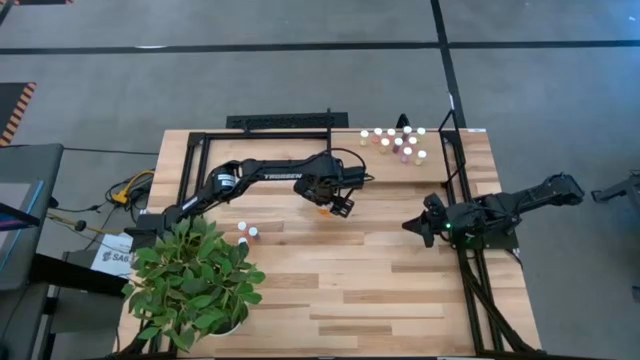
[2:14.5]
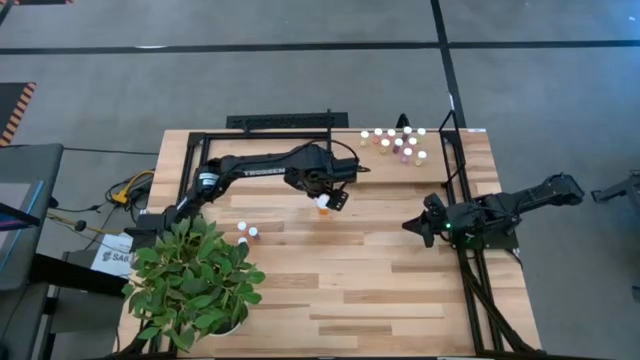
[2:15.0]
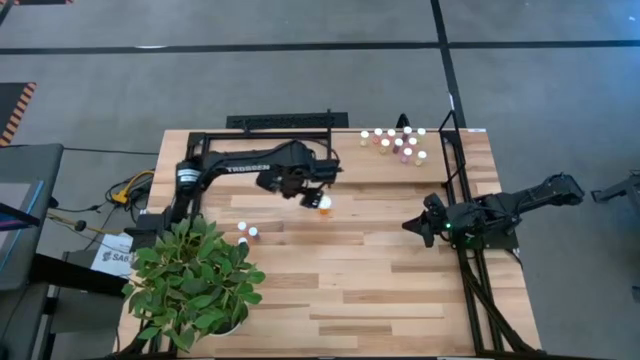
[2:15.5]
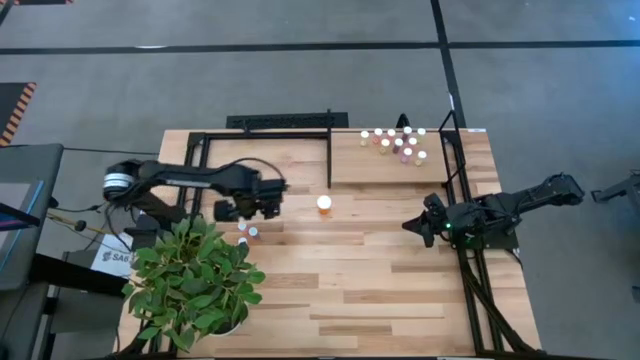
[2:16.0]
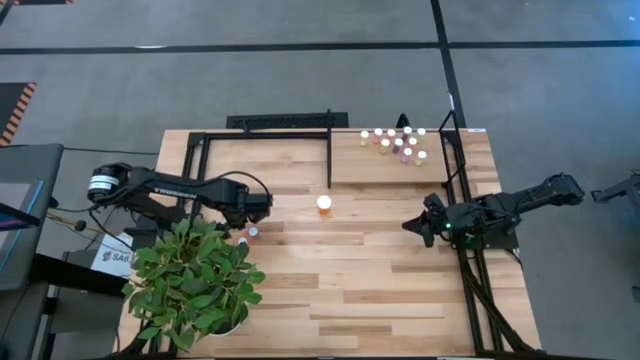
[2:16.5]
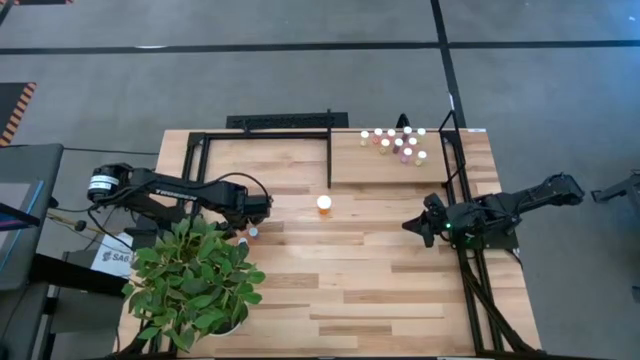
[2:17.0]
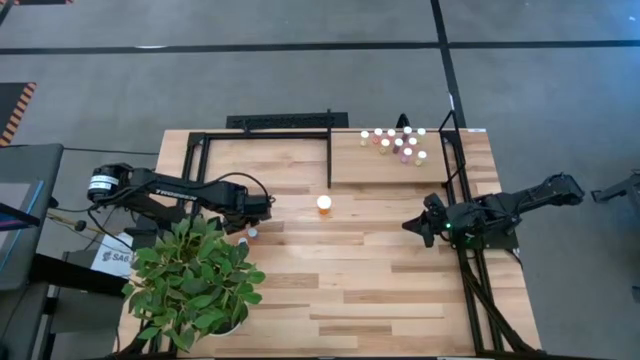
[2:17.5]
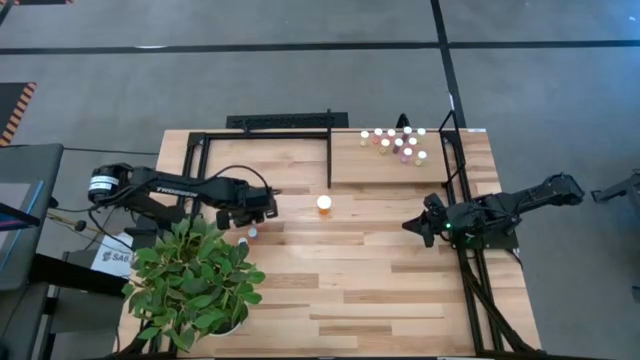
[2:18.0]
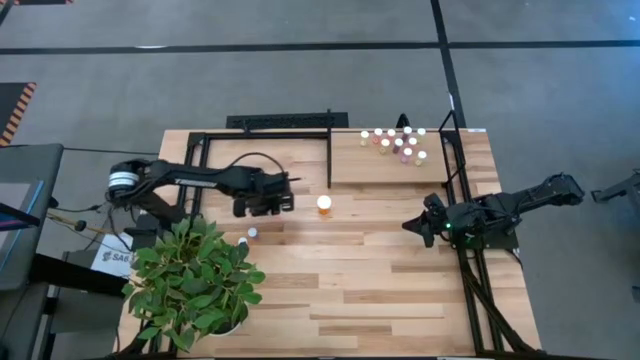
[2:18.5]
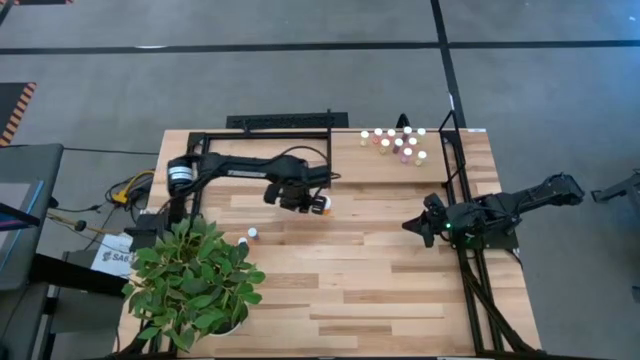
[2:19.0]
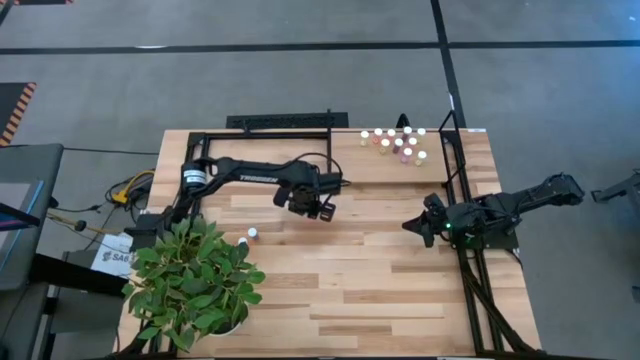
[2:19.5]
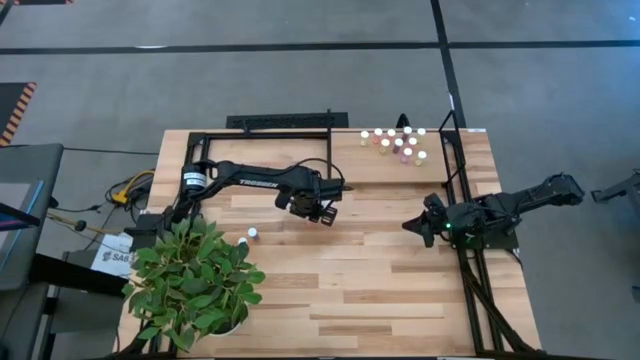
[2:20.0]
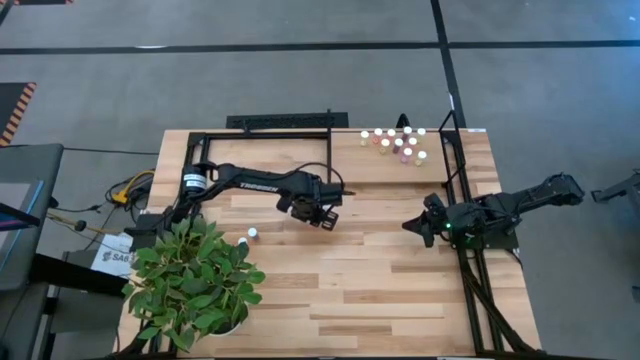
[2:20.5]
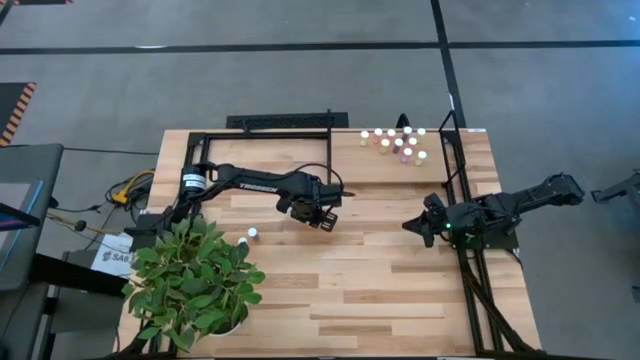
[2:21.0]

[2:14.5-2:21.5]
Task: Pick and place medicine bottles onto shelf by color
Move the pink pill bottle to the center of the table

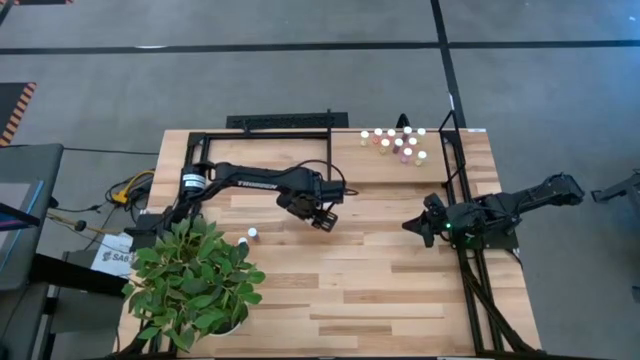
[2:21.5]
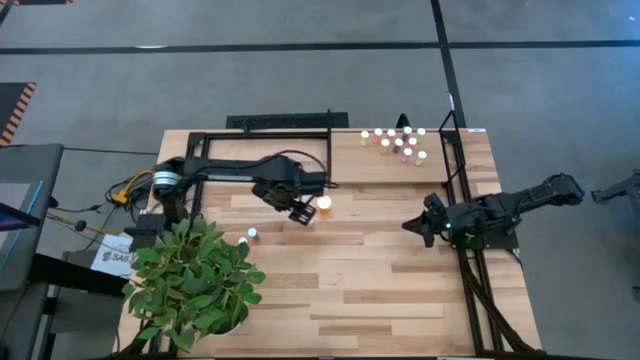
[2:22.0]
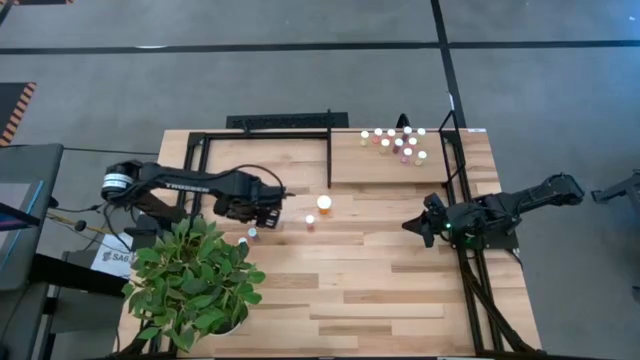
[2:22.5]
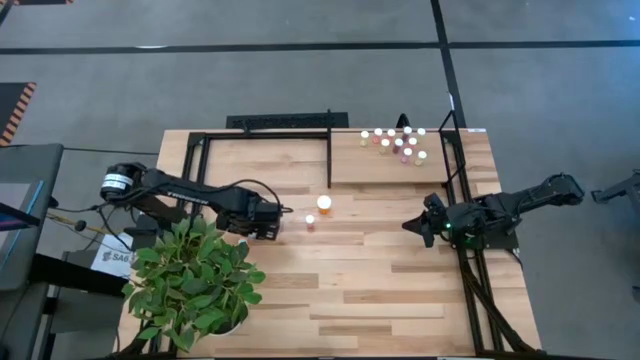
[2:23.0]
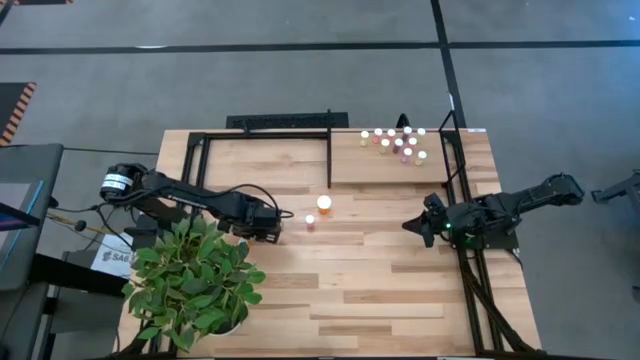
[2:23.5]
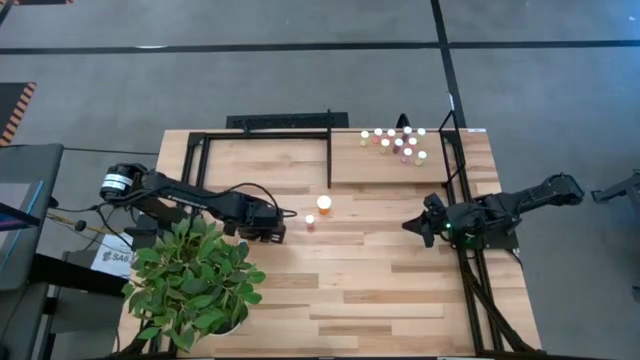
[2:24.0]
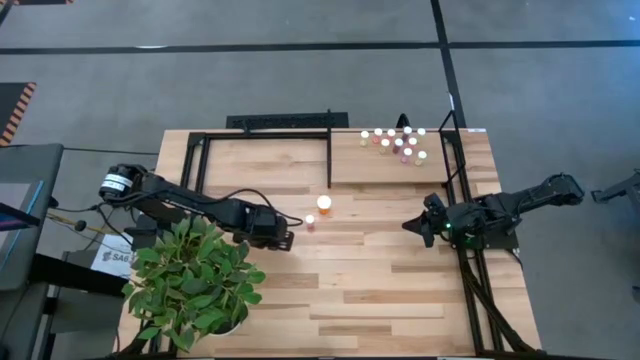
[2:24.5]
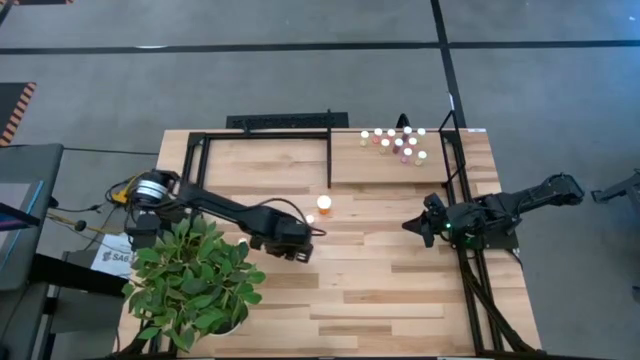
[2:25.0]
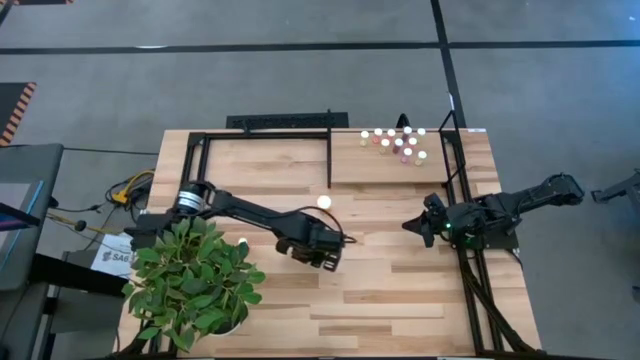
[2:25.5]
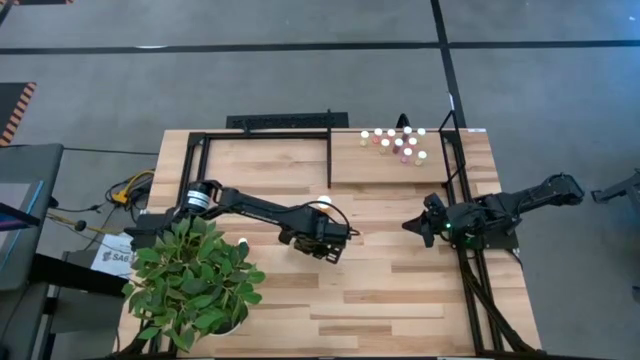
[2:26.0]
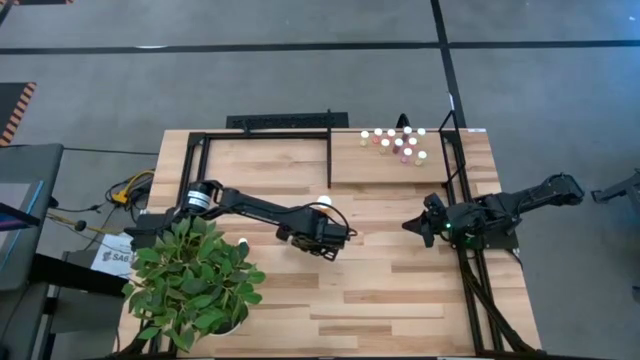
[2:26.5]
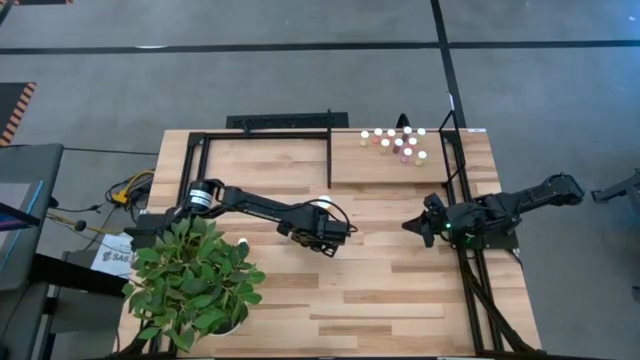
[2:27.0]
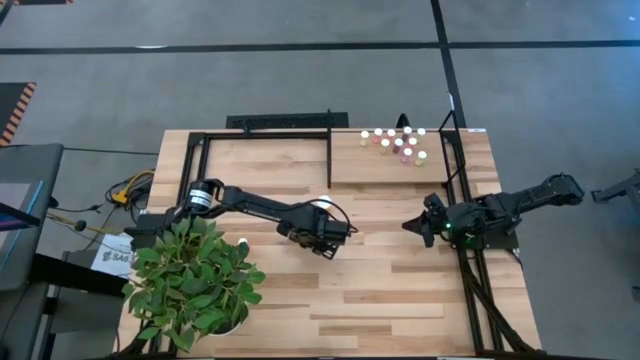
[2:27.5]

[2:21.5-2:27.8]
Move the blue pill bottle to the center of the table

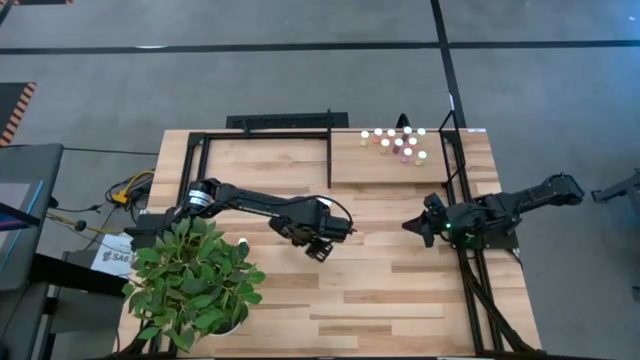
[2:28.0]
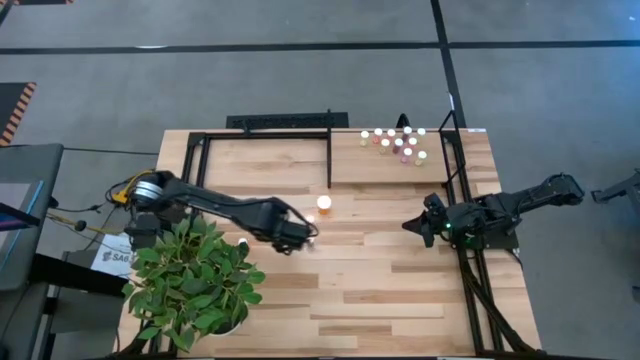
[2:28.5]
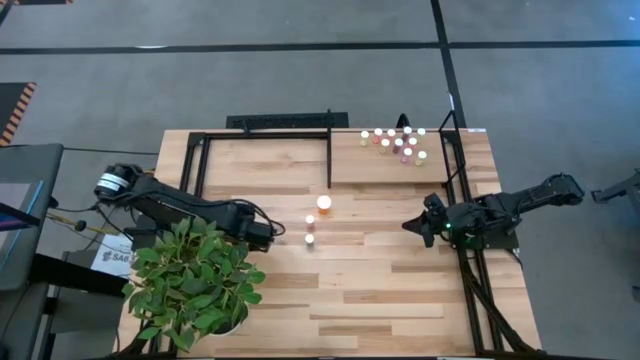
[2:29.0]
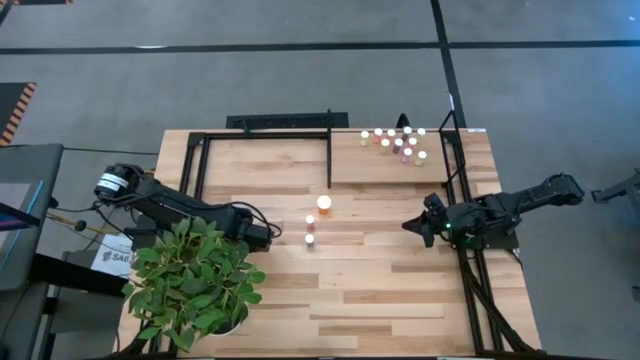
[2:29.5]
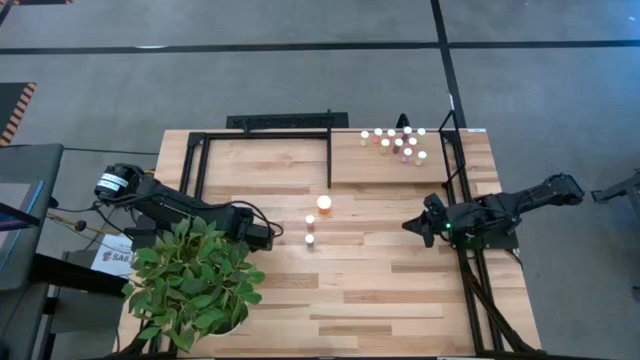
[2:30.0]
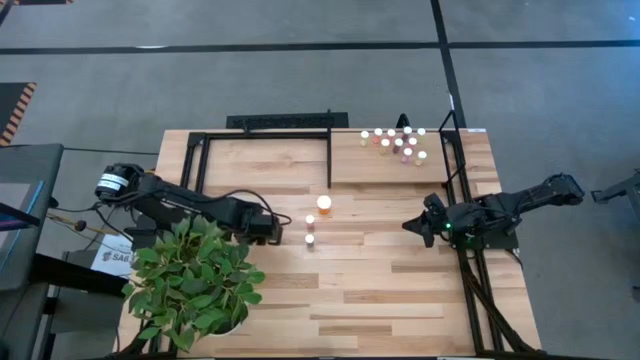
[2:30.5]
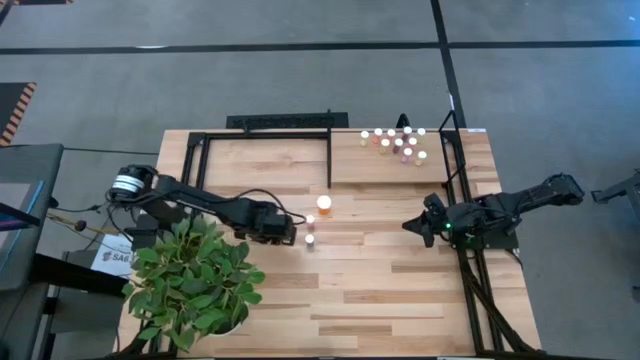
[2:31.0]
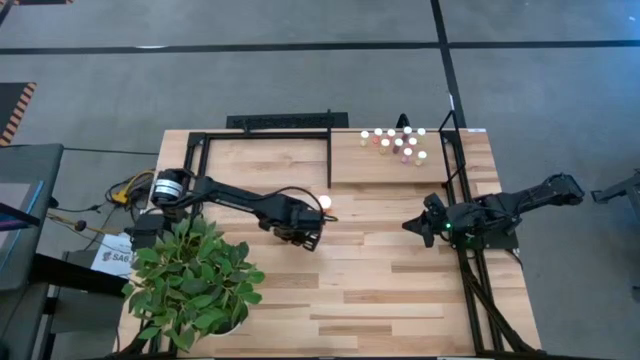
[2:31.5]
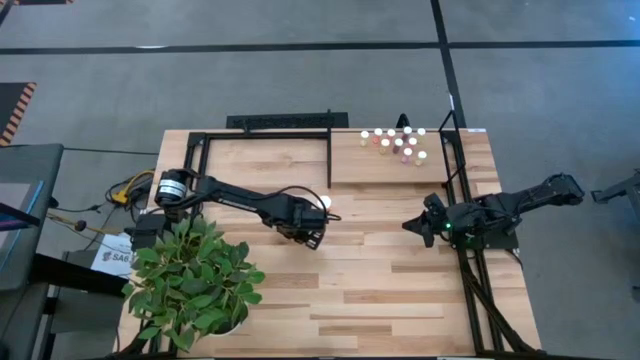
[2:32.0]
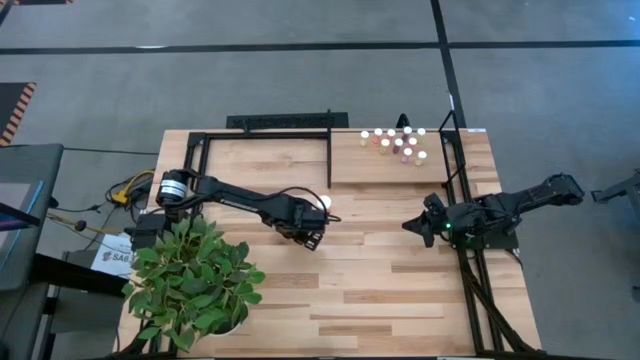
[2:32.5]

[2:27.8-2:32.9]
Move the pink pill bottle to the center of the table

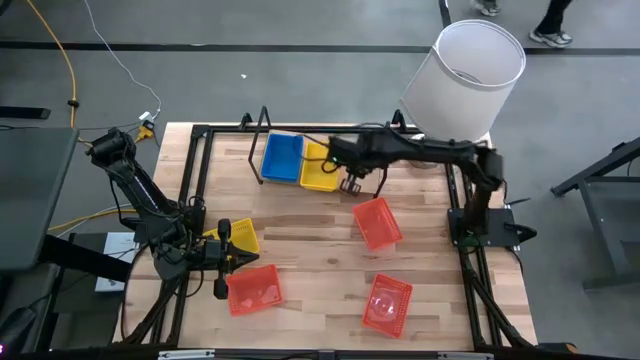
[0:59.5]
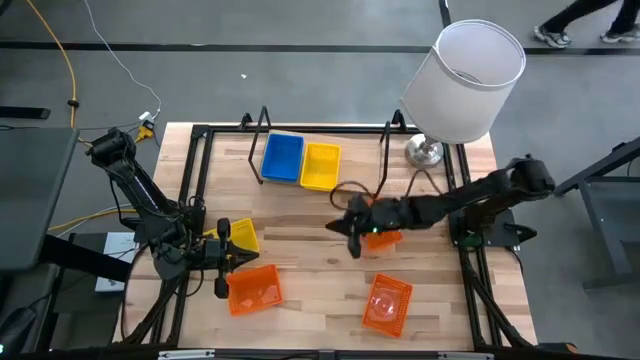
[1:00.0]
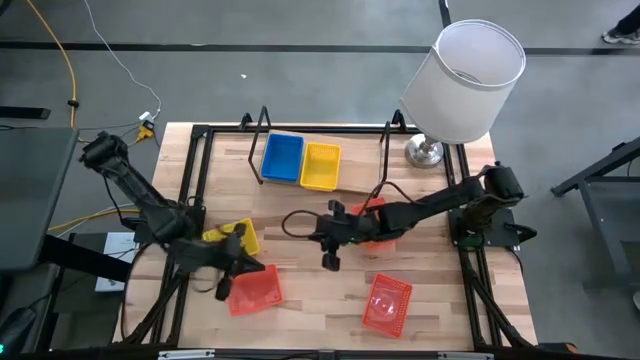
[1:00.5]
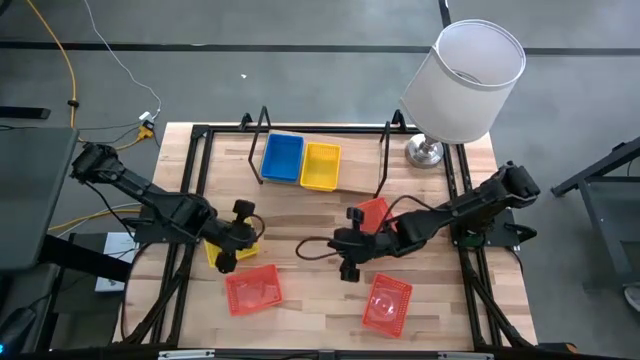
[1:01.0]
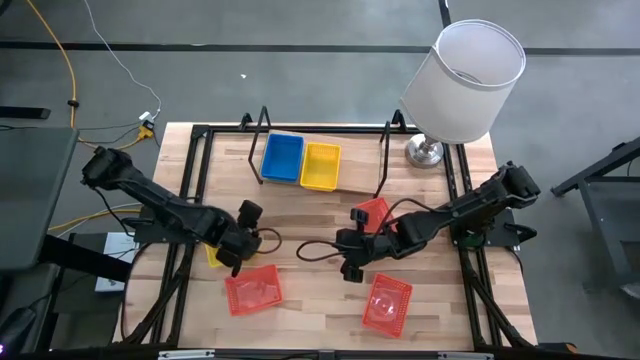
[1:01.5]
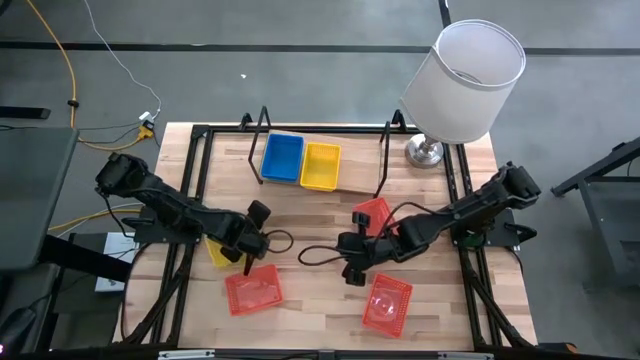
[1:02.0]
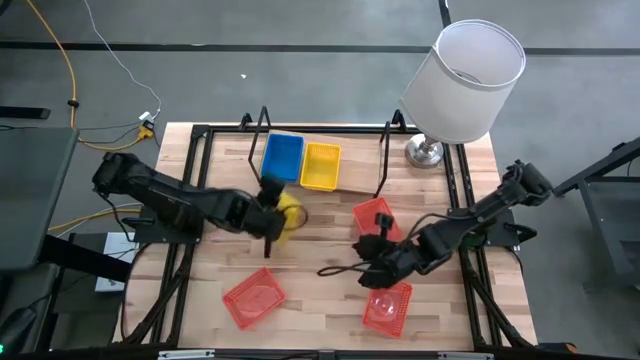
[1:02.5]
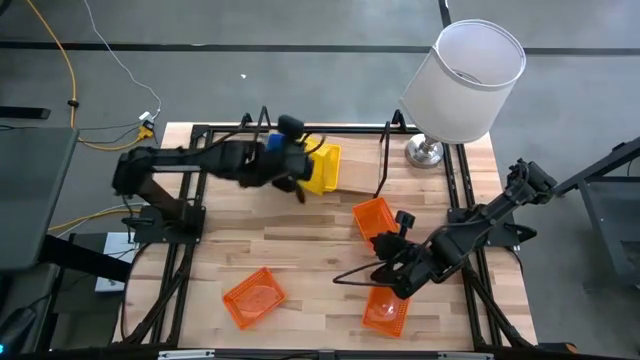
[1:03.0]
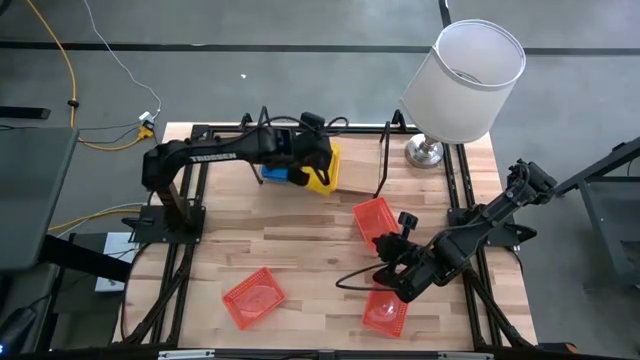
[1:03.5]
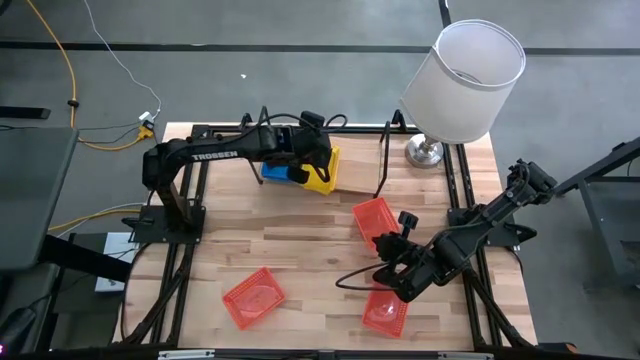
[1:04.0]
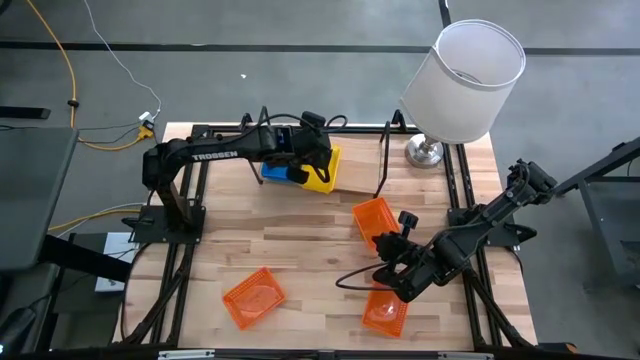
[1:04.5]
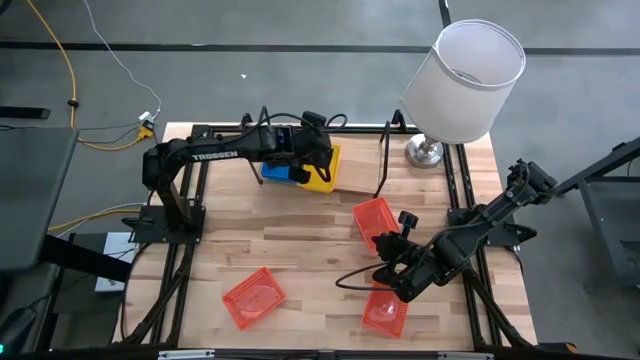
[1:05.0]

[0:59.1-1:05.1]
Task: Stack baskets on shelf by color
Stack the yellow bin on the yellow bin on the shelf
